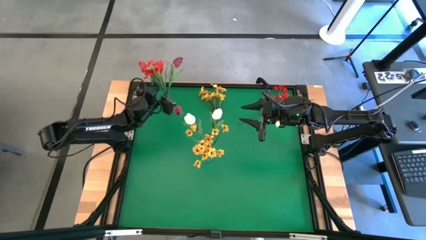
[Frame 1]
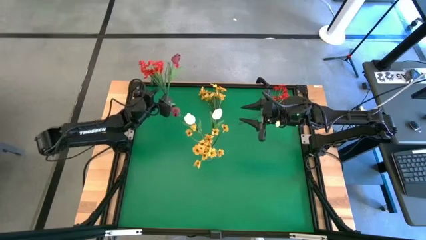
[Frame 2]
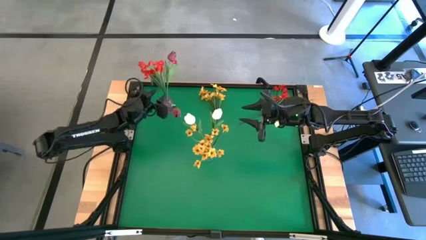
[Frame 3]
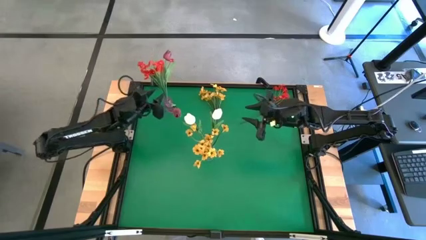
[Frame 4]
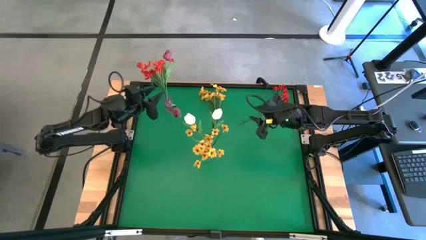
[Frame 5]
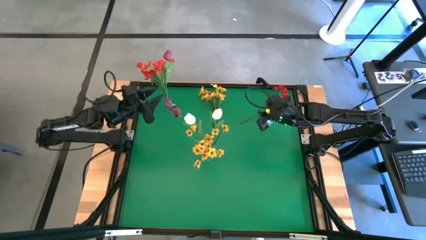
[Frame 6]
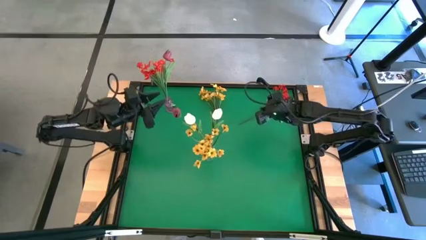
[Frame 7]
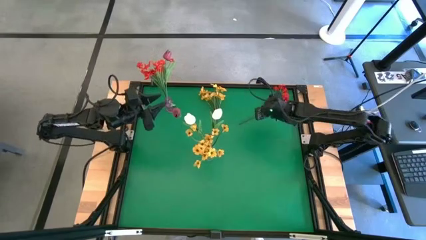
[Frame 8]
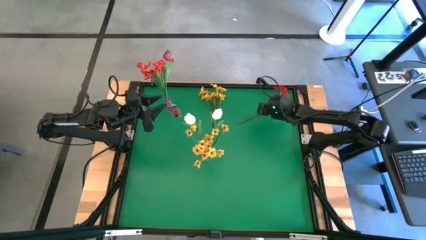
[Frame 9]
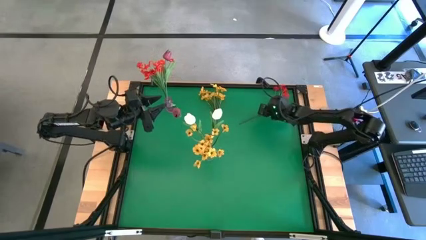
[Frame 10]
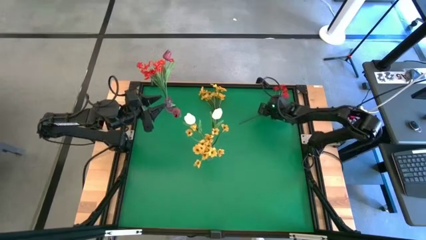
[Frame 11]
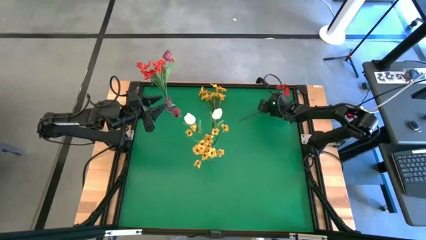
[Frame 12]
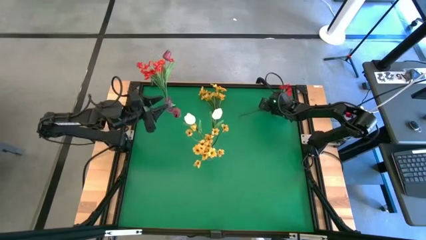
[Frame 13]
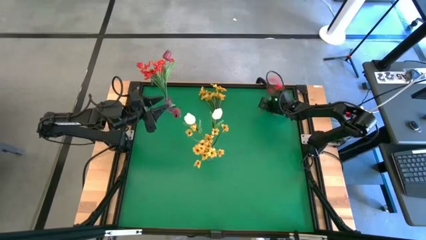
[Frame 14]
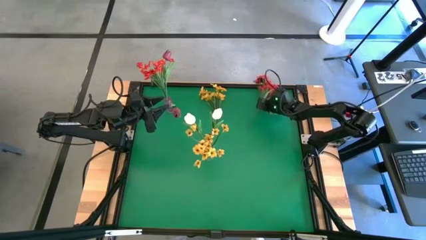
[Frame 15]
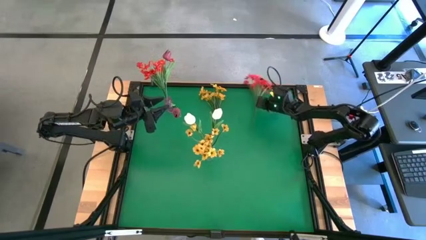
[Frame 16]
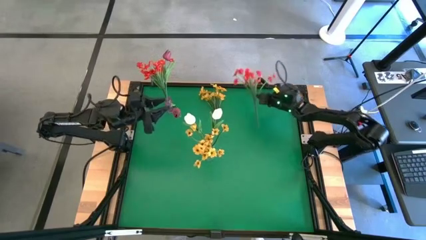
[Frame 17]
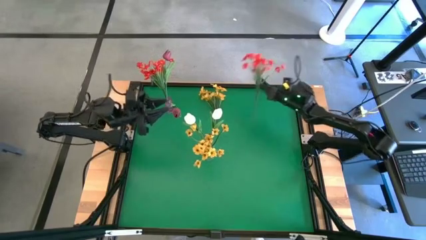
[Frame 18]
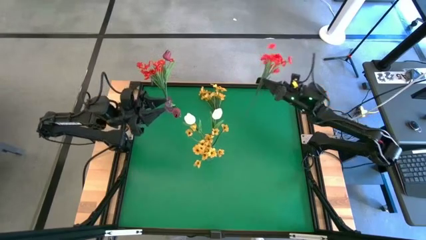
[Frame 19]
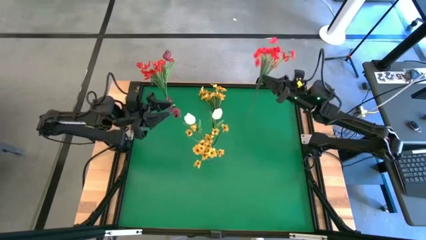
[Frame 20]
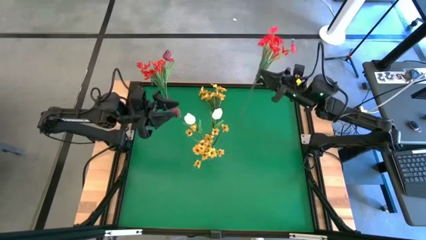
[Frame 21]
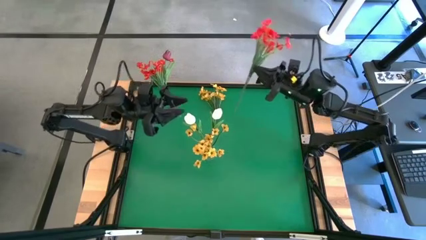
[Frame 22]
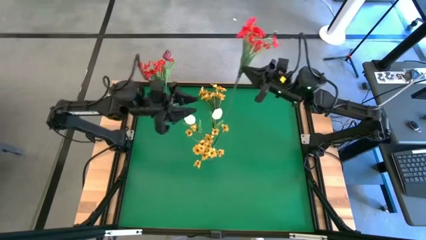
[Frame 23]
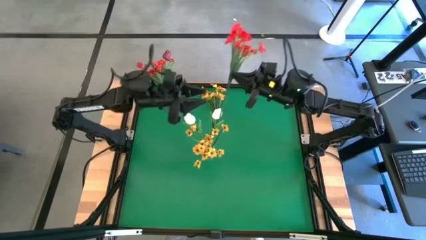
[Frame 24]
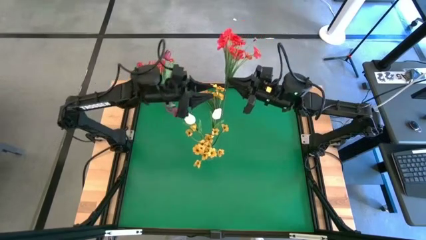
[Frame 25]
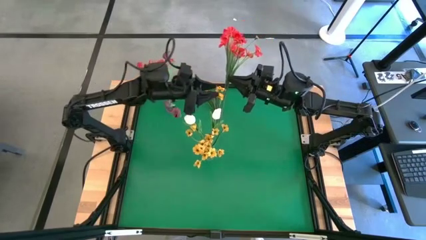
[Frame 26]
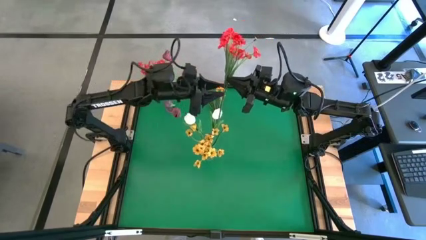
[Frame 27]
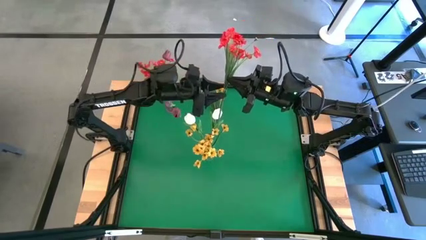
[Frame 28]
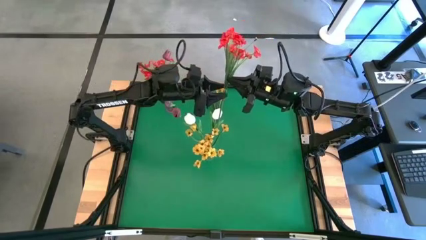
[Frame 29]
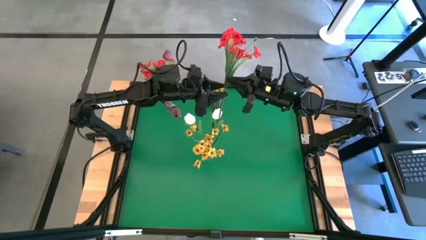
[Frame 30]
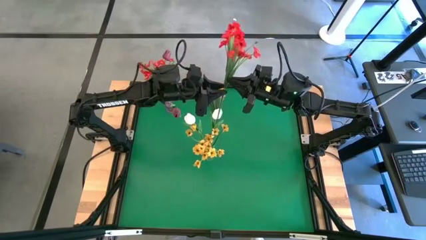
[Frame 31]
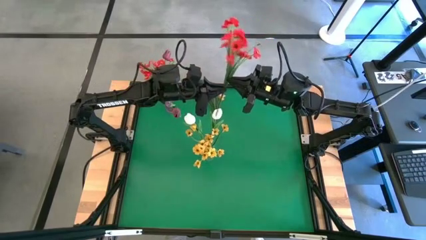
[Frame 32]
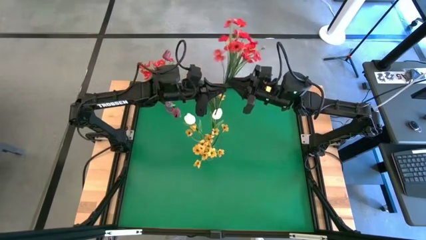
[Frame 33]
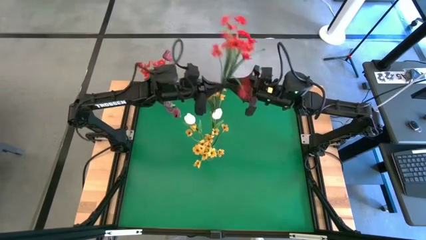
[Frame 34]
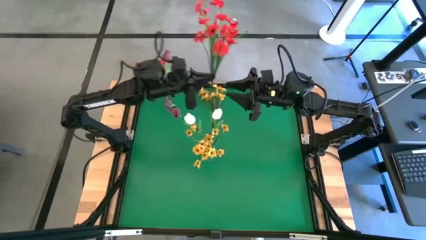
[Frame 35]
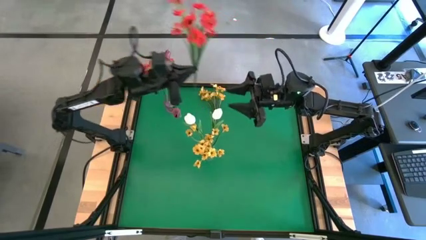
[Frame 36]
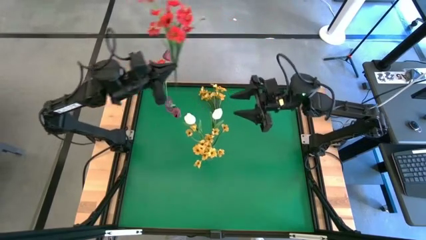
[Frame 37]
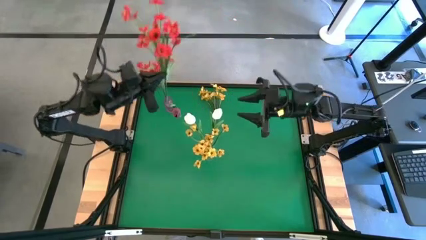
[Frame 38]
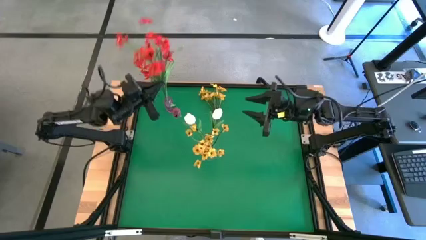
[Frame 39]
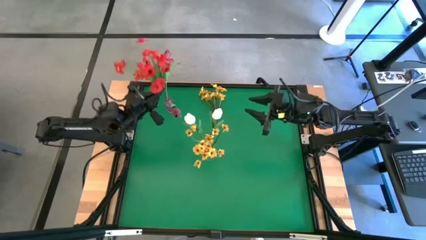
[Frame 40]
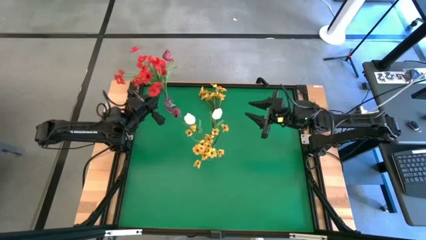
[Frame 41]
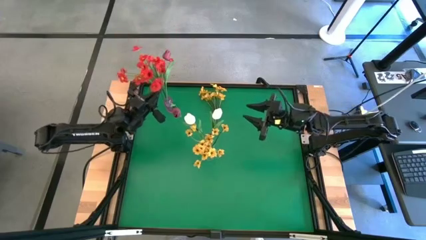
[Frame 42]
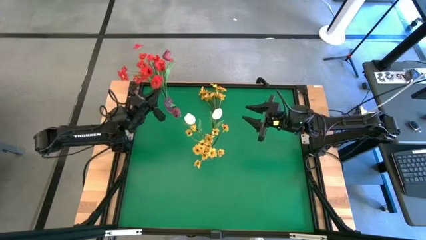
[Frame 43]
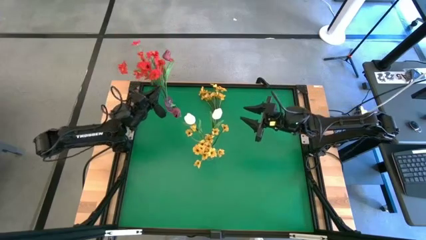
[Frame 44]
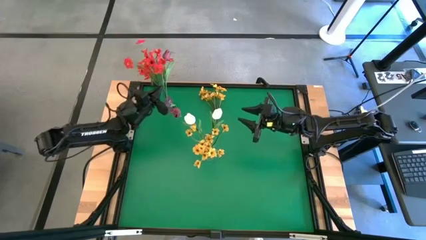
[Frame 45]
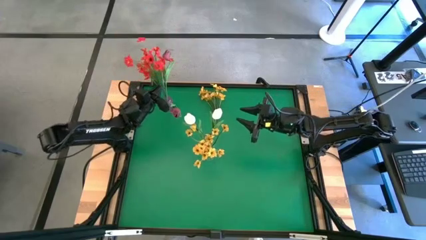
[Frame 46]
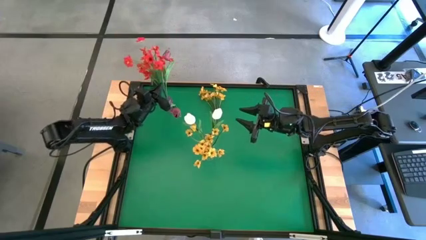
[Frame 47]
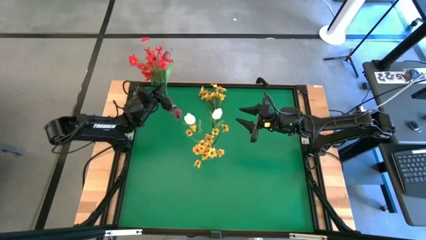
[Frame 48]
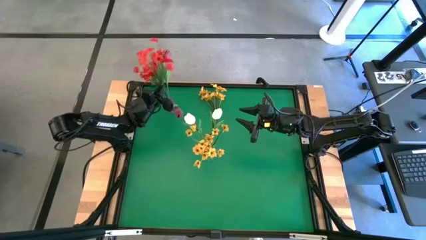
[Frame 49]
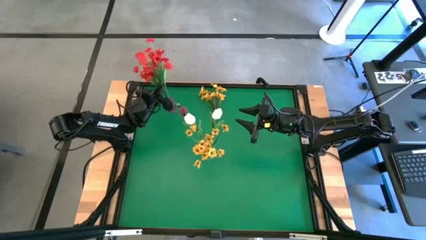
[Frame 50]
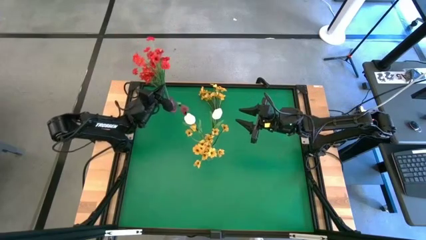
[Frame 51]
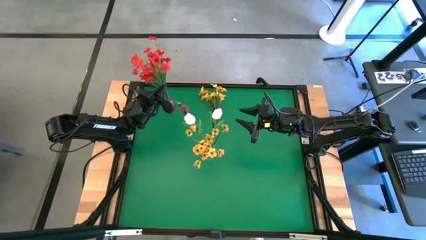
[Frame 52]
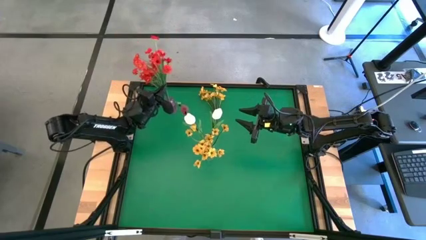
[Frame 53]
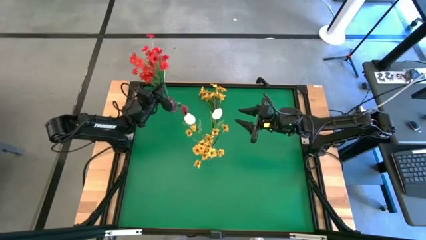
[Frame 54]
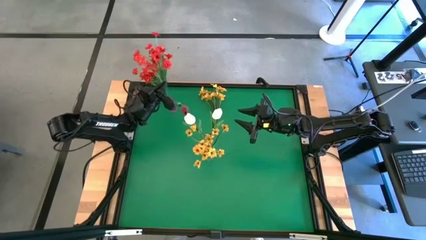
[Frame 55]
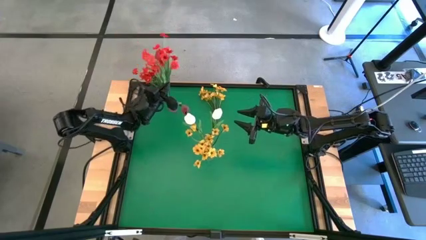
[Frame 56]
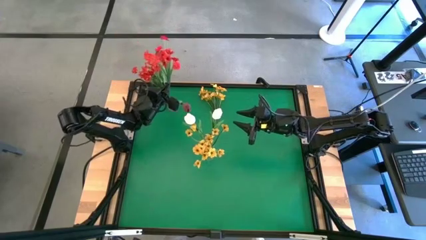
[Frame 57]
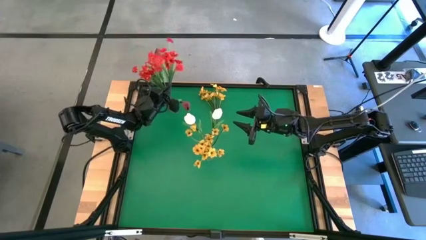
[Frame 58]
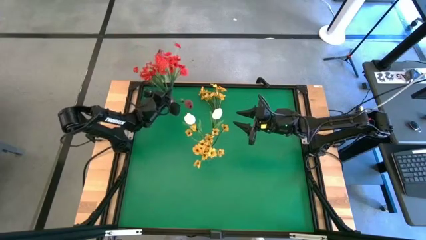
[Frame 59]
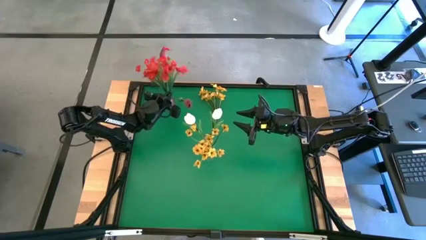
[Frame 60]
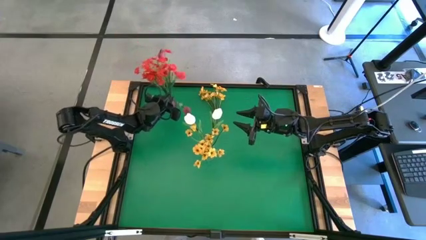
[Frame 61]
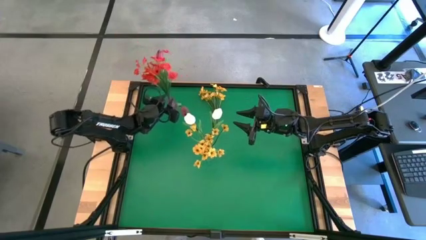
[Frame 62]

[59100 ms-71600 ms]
Task: Sort flowers into vase by color
Put the red flowers into the pink vase

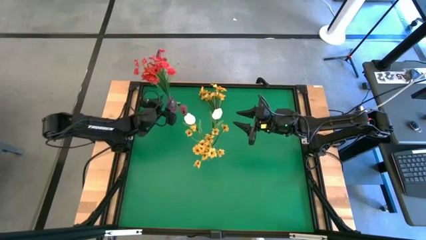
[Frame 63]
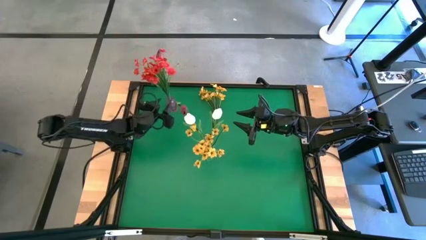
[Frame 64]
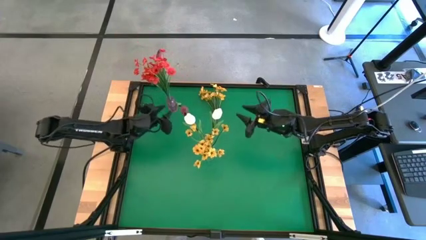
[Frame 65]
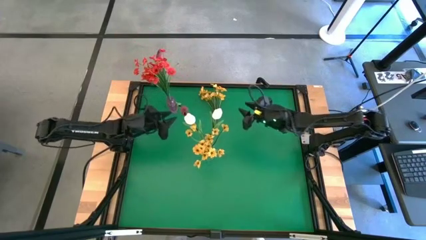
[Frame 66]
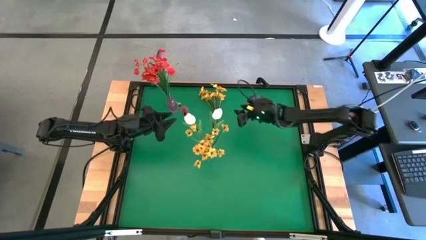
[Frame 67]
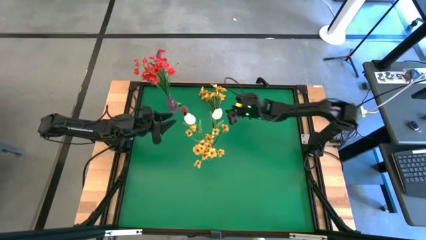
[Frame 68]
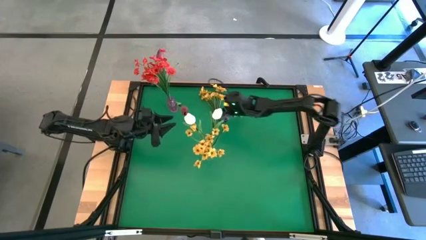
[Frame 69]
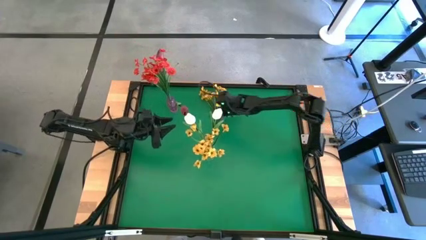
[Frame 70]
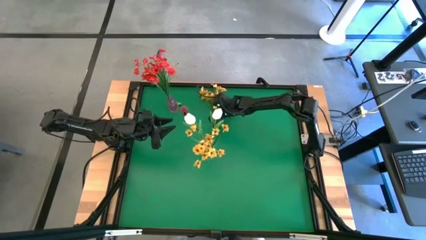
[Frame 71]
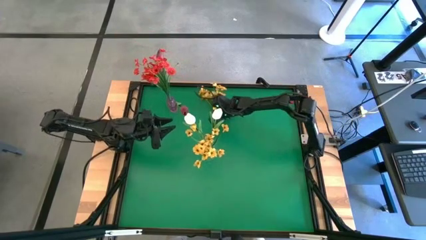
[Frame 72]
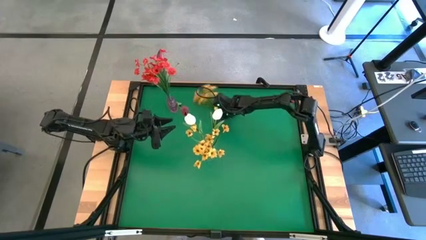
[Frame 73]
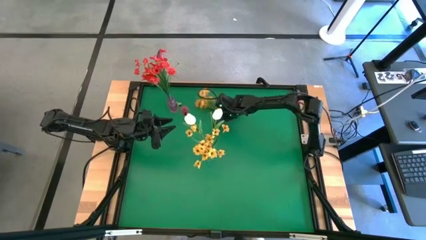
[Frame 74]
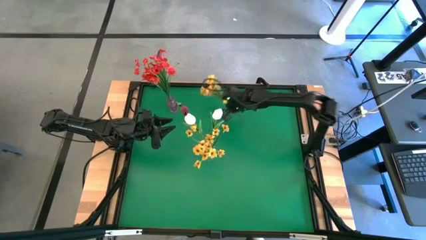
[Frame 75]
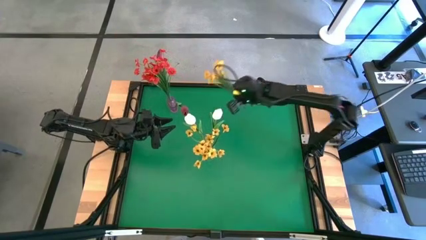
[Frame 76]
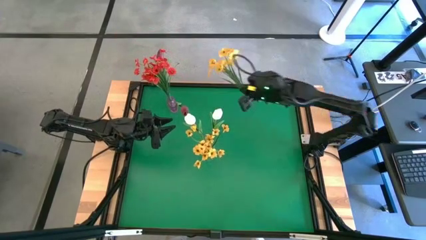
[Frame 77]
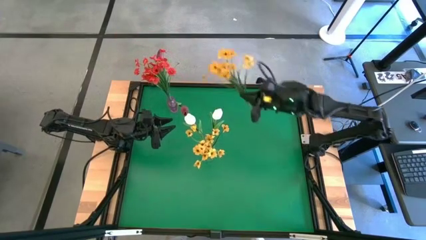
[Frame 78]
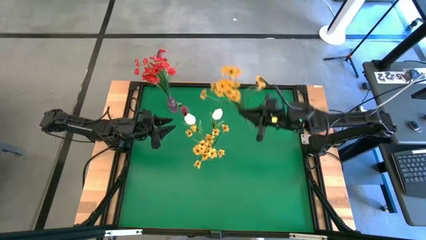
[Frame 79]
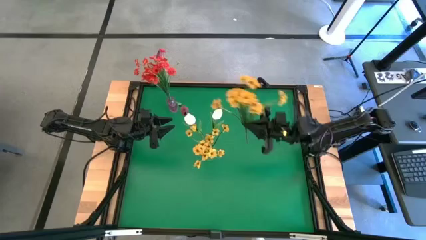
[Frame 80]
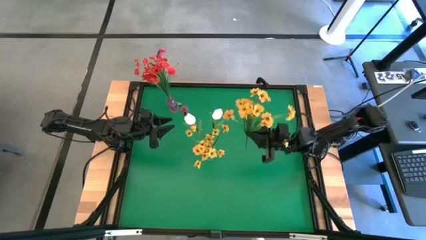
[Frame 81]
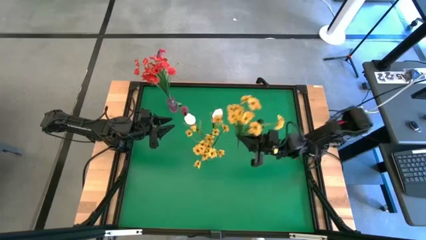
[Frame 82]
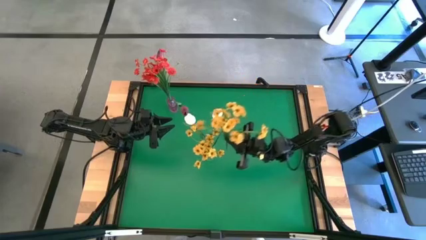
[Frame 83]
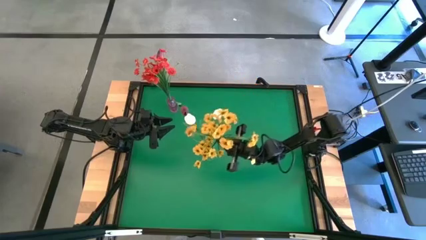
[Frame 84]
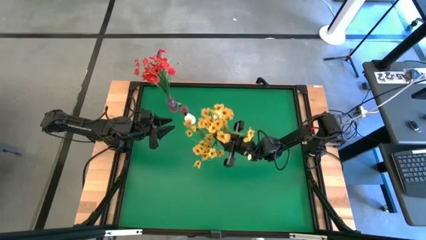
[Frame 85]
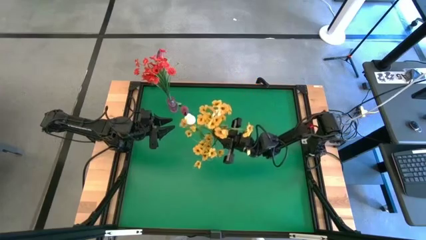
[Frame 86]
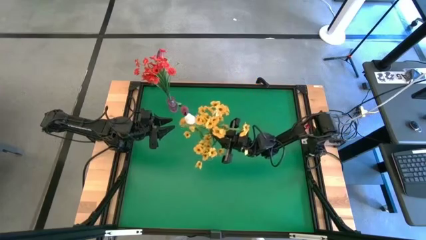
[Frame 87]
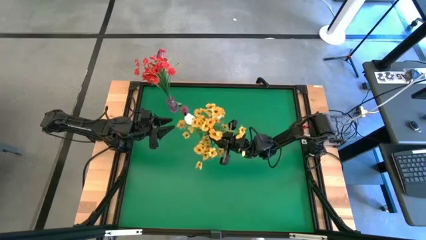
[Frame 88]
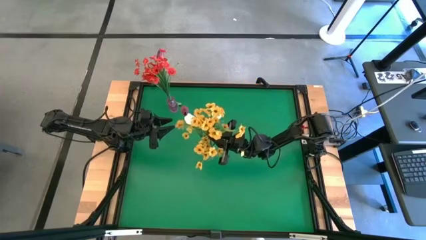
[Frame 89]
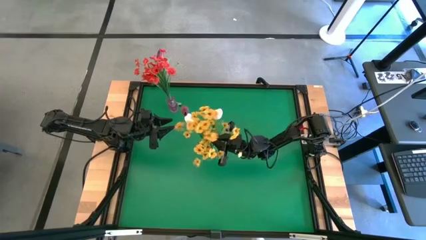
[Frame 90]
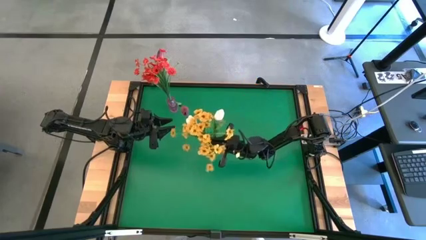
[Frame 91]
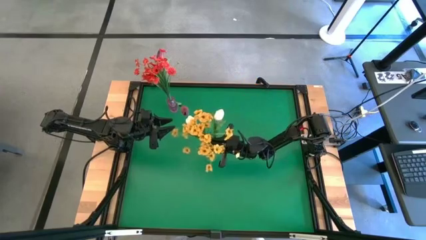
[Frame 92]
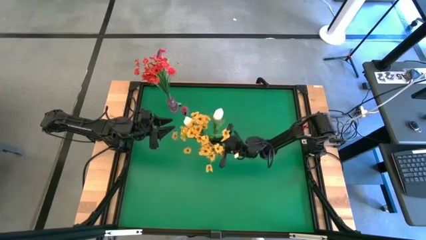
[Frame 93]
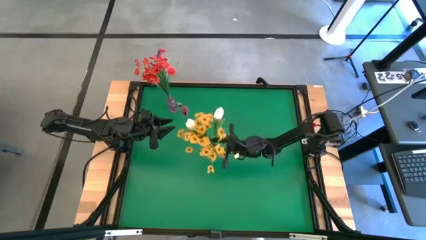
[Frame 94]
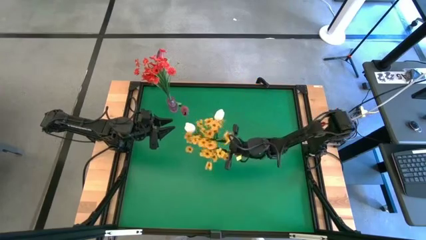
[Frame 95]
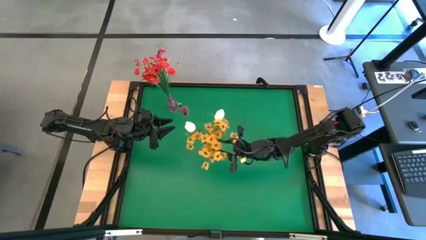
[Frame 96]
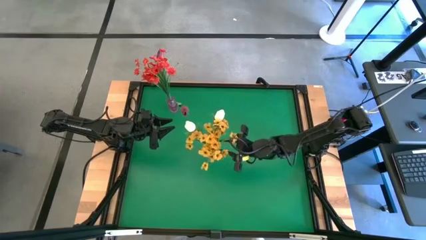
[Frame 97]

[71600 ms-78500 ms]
Put the yellow flowers into the transparent vase
